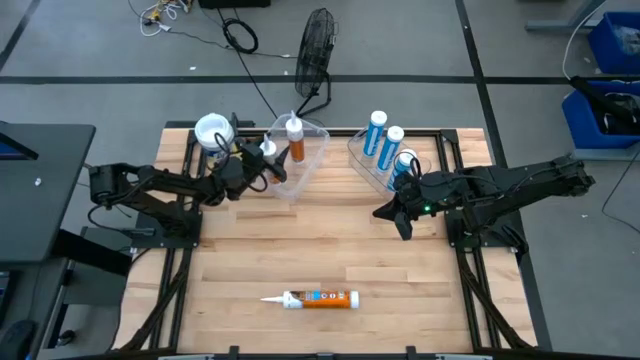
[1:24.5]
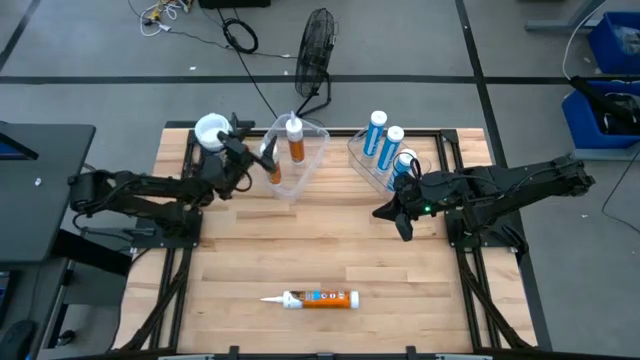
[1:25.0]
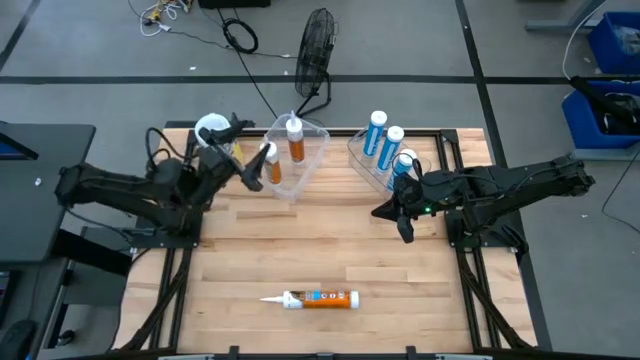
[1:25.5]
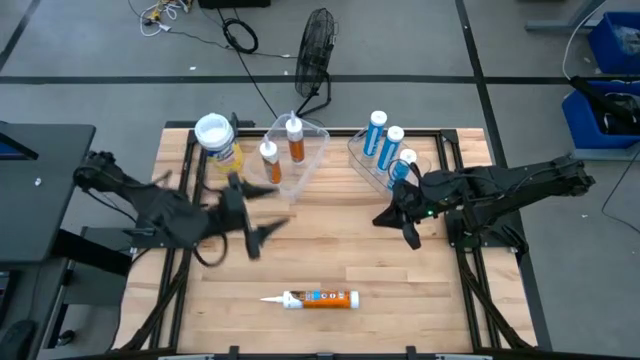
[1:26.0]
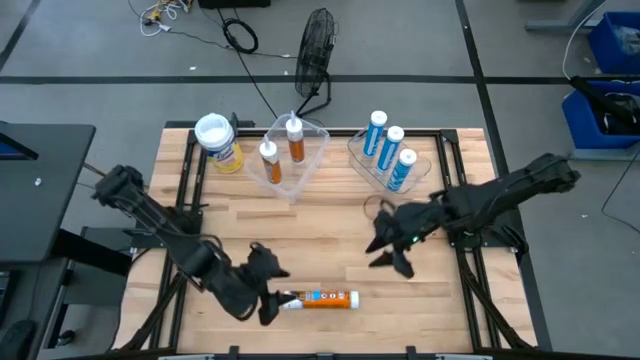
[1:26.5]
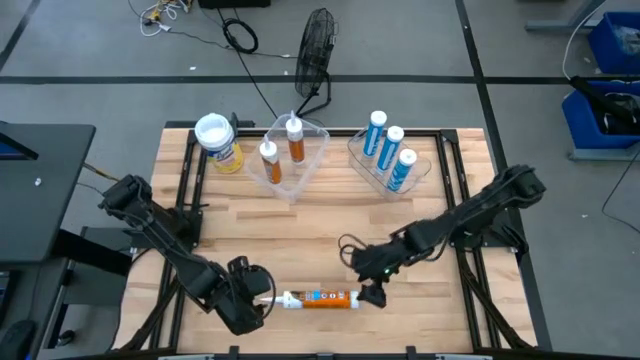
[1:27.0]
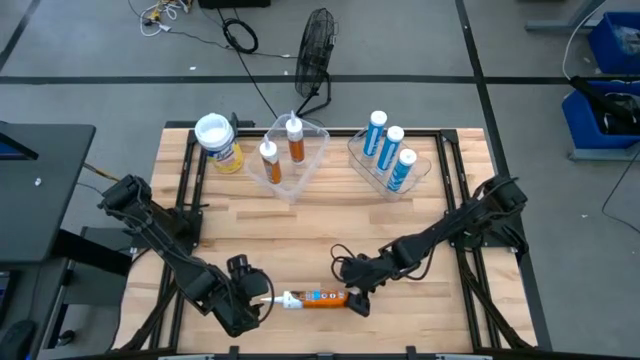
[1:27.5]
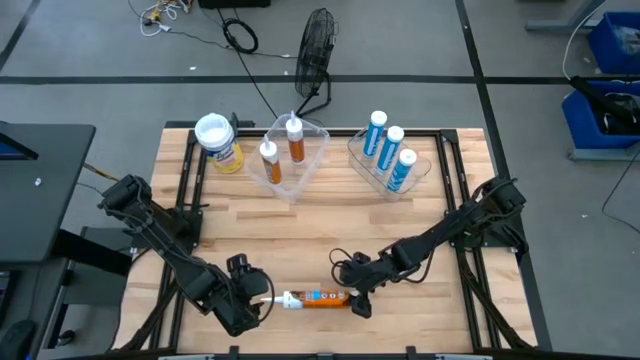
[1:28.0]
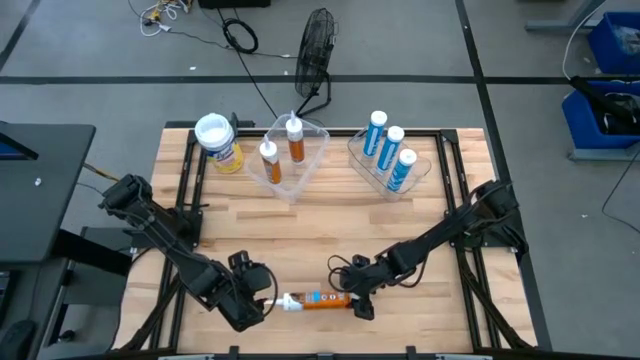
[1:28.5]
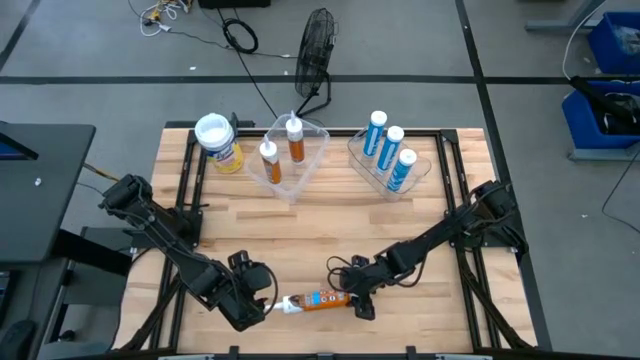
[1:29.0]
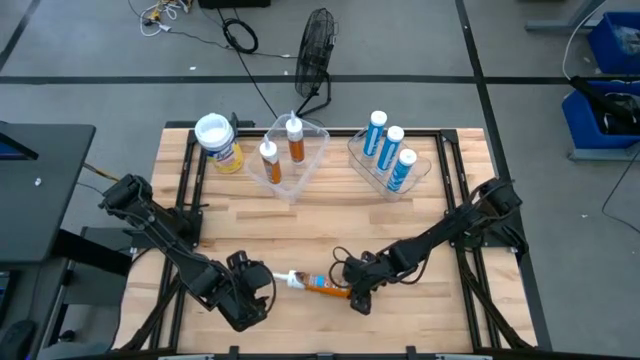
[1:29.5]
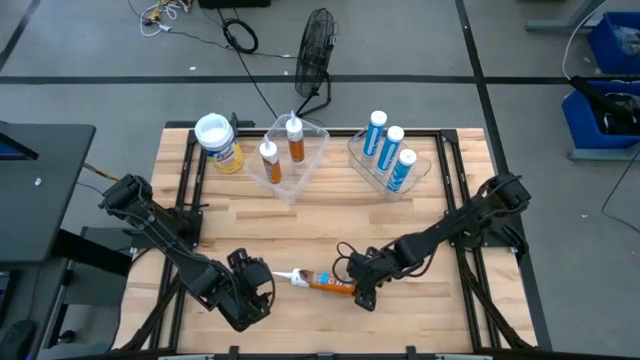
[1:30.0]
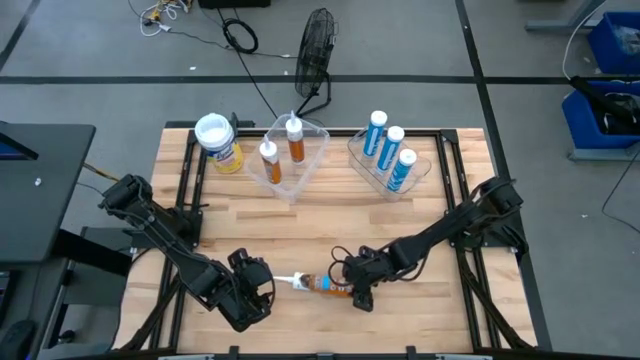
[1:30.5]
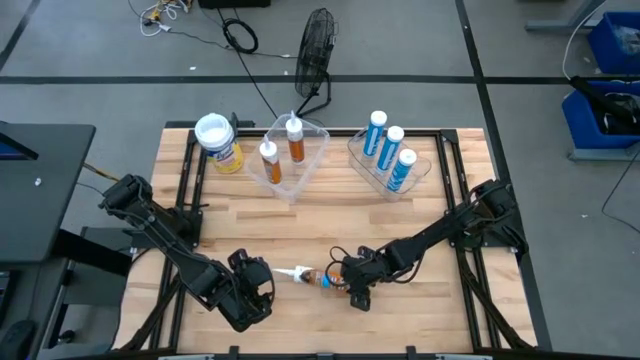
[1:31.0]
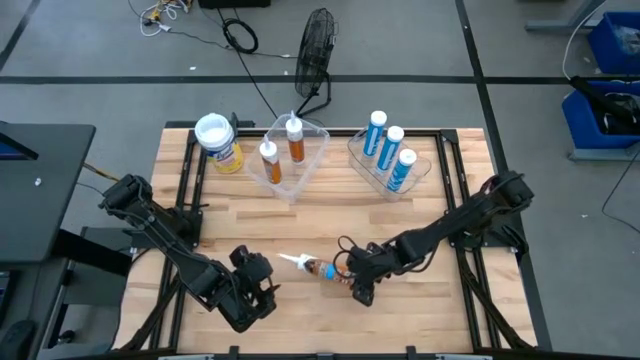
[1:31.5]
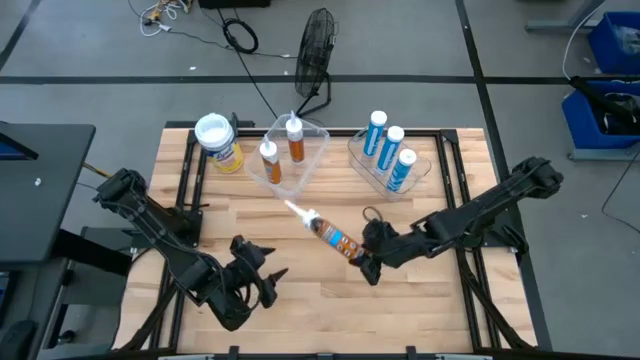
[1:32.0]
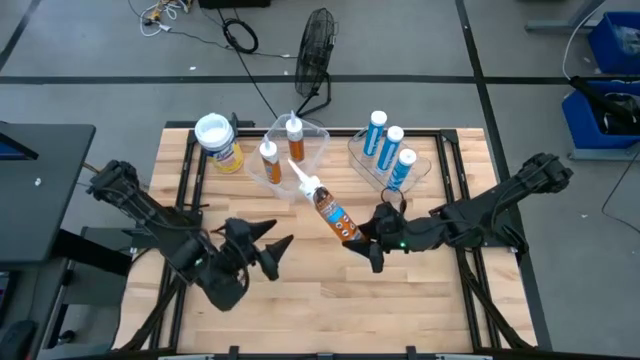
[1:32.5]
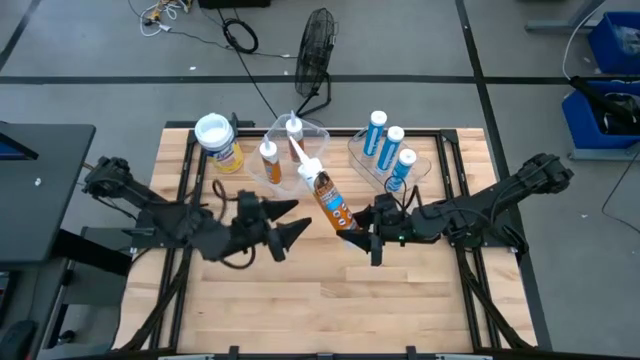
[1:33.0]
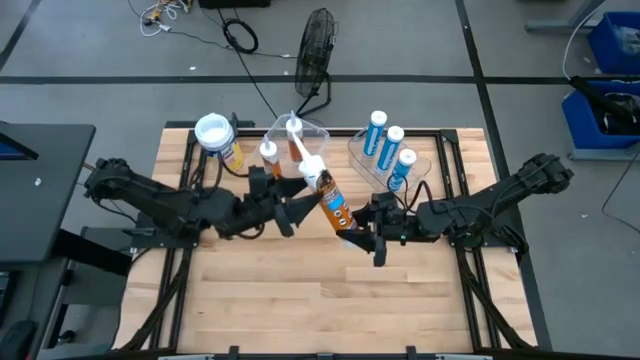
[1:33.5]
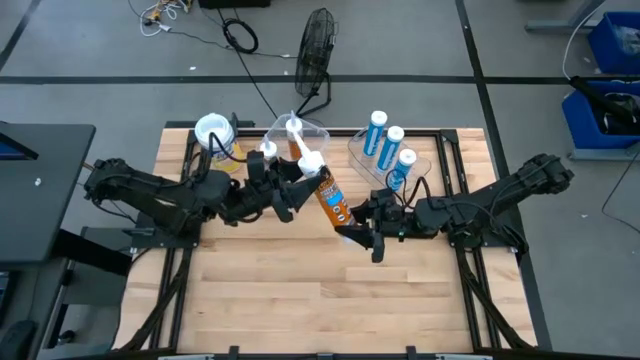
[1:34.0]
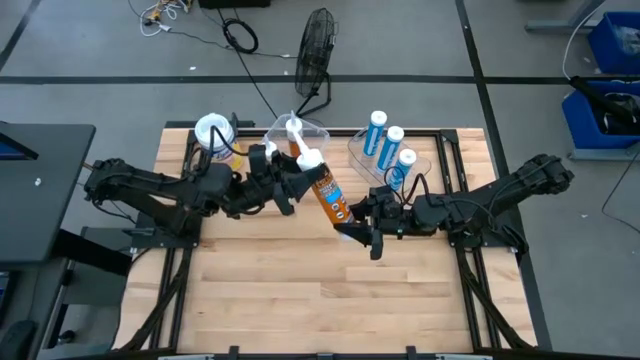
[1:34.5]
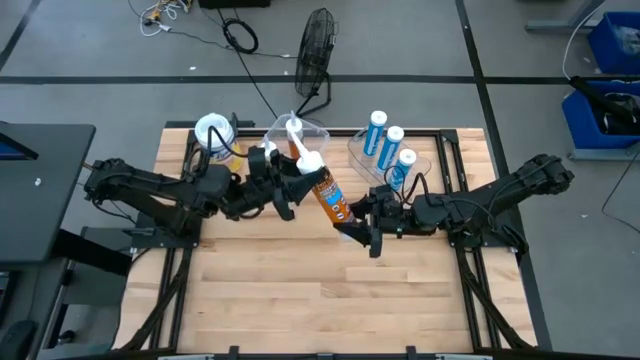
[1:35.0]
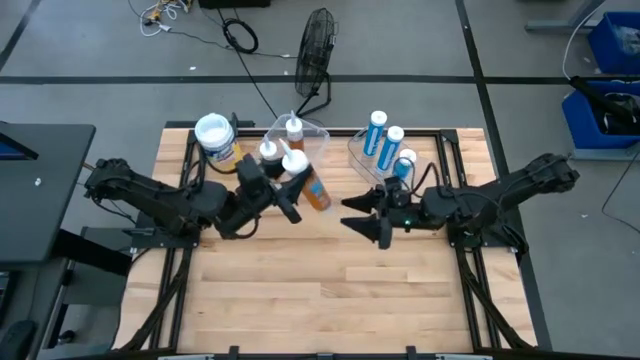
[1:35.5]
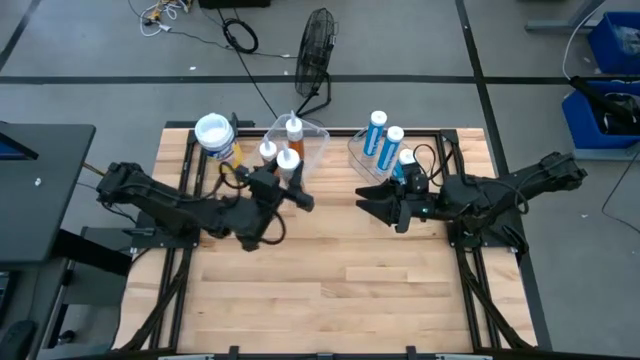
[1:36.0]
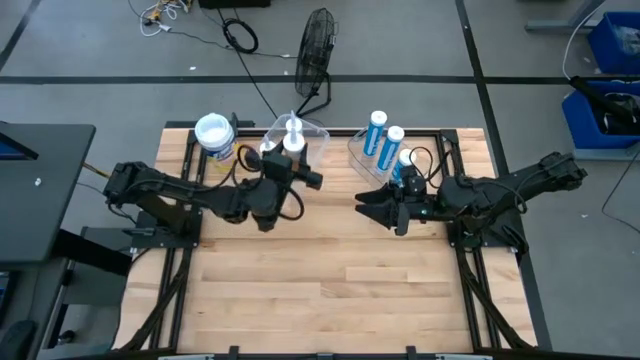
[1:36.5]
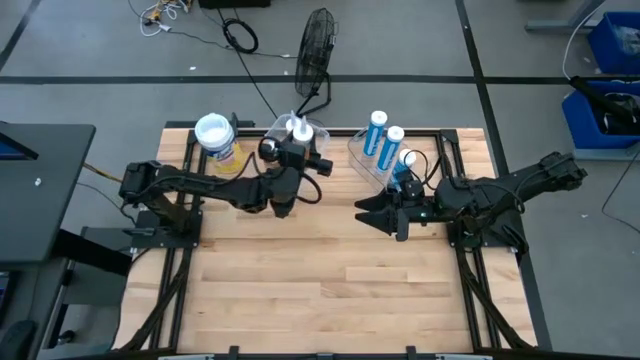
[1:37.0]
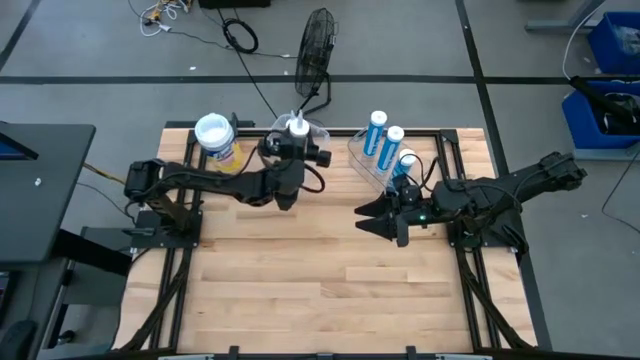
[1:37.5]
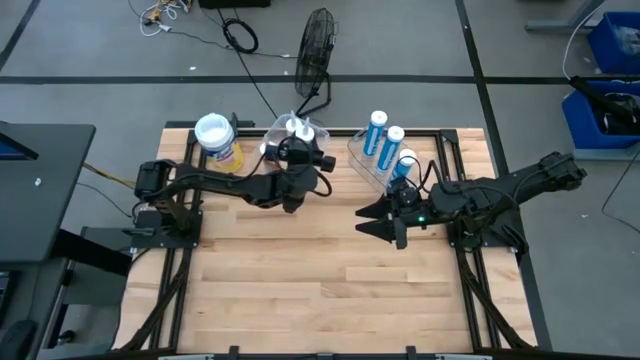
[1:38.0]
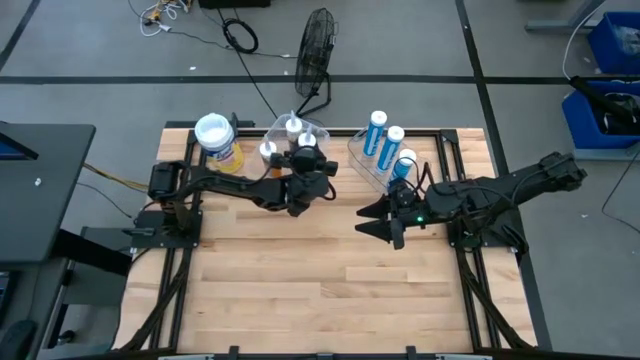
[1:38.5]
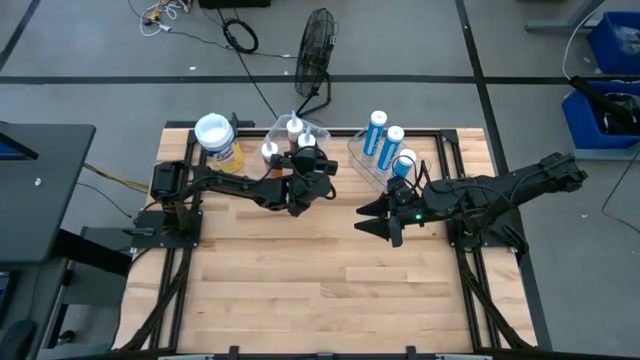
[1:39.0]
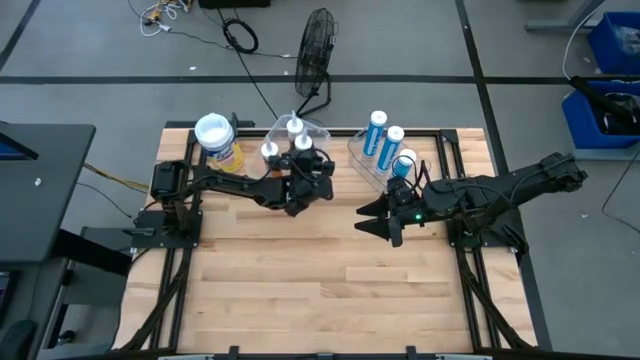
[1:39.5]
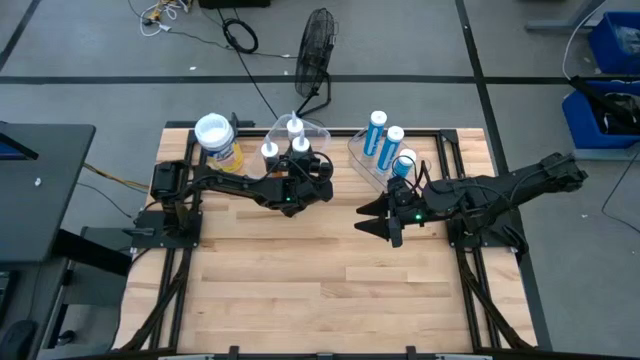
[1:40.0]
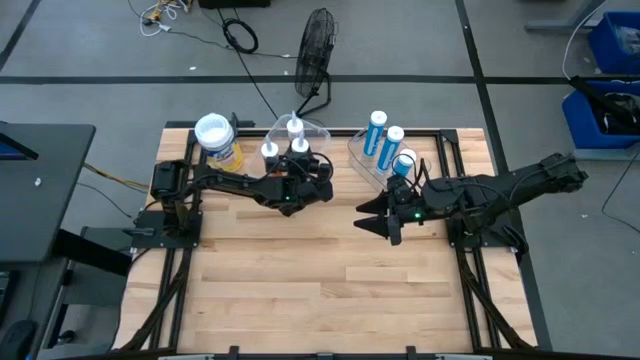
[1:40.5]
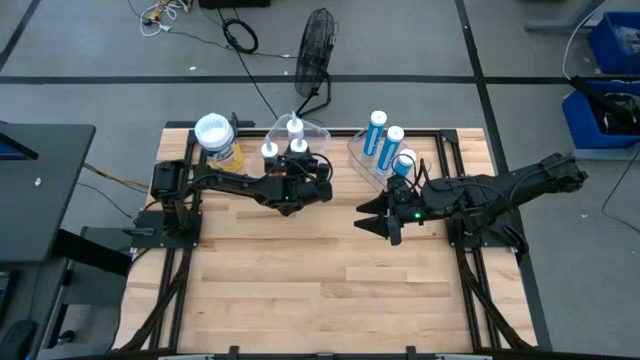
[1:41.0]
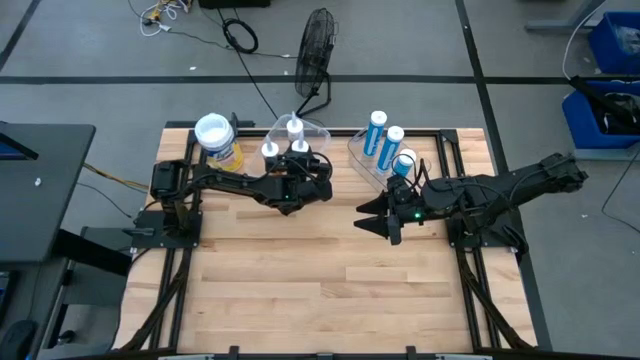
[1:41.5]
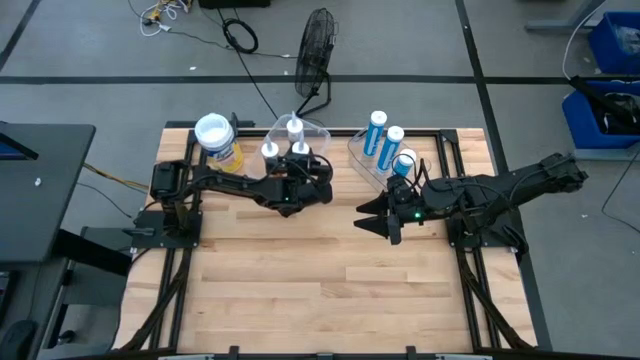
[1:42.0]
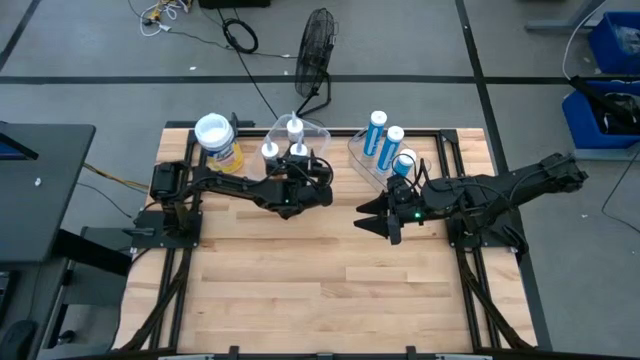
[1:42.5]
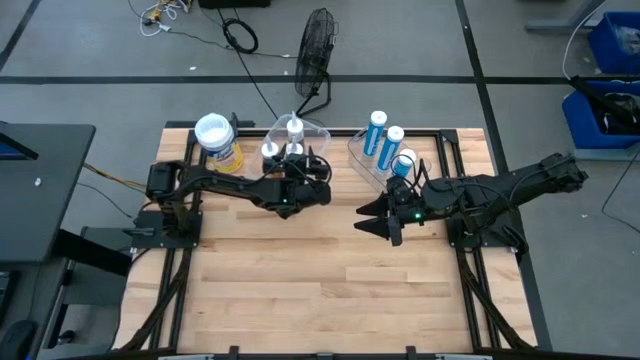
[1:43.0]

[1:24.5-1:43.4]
Task: Pick & place silicon tubes, Sealant and Lysol wipes
Put the orange sealant into the left transparent bin

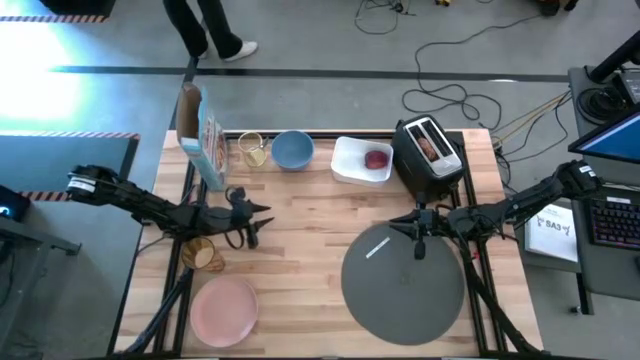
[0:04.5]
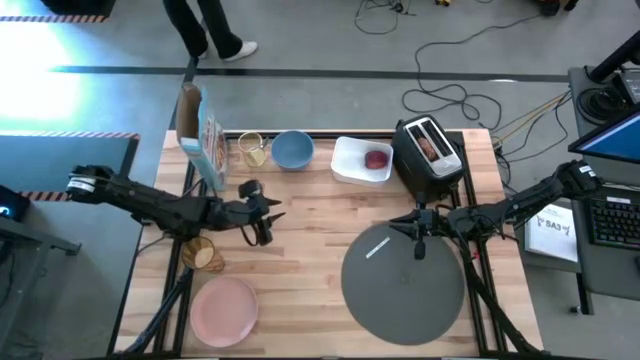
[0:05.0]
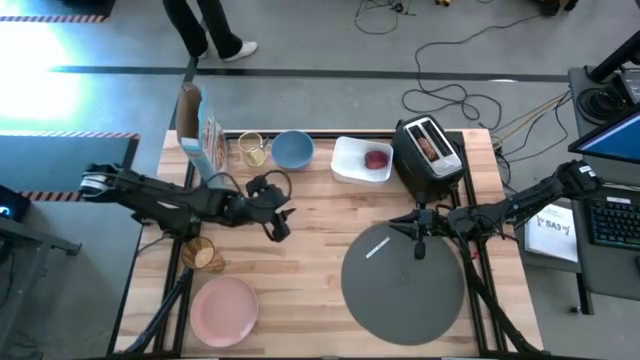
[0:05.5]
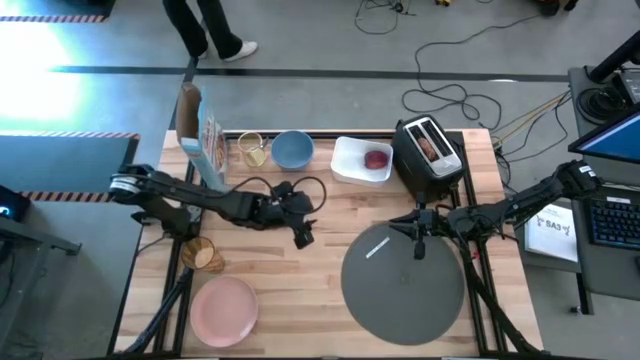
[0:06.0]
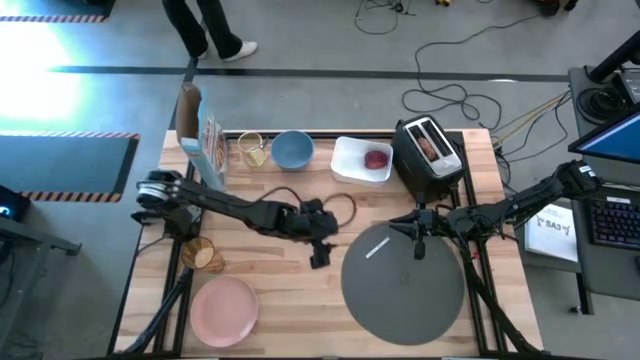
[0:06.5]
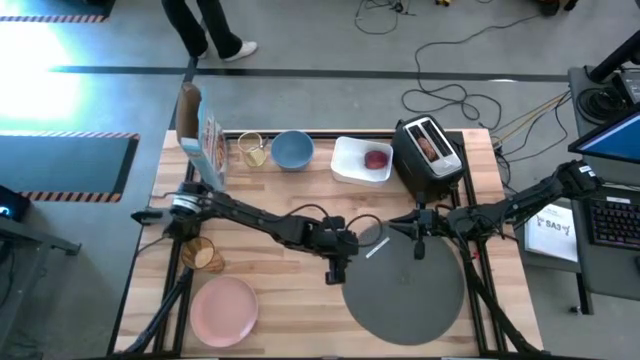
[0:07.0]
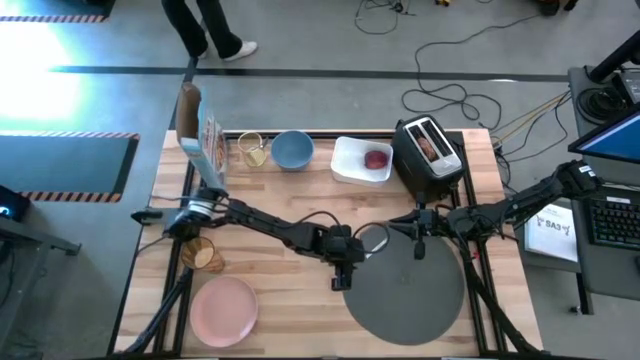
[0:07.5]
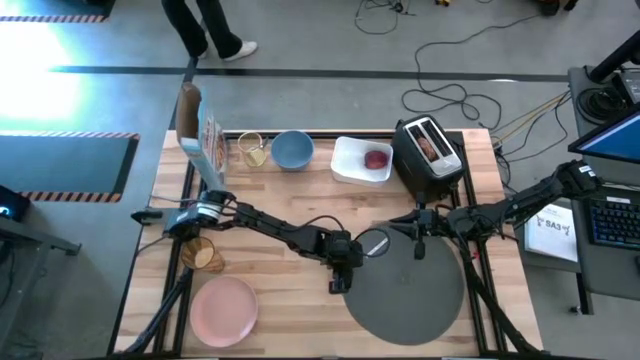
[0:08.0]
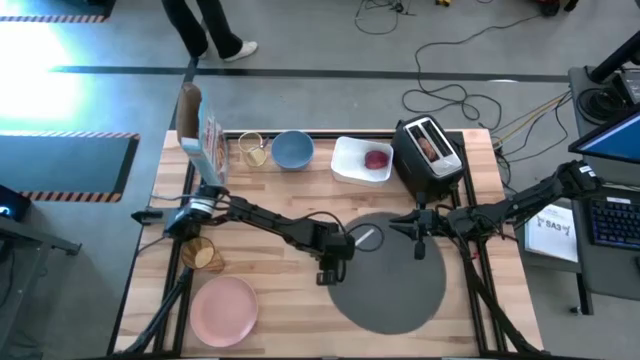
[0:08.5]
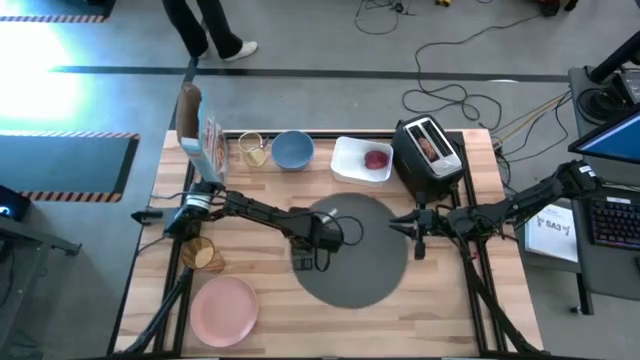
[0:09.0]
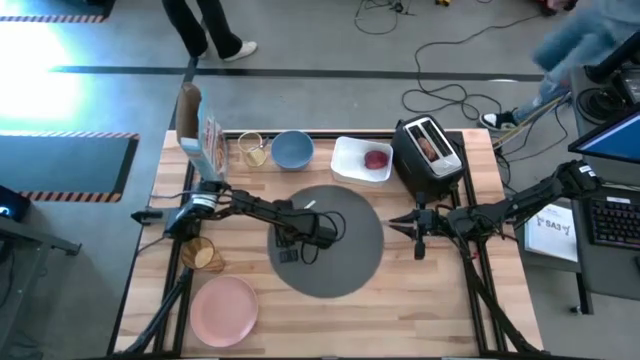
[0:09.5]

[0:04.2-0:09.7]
Task: Arrange a breakfast setting
Move the placemat to the center of the table
